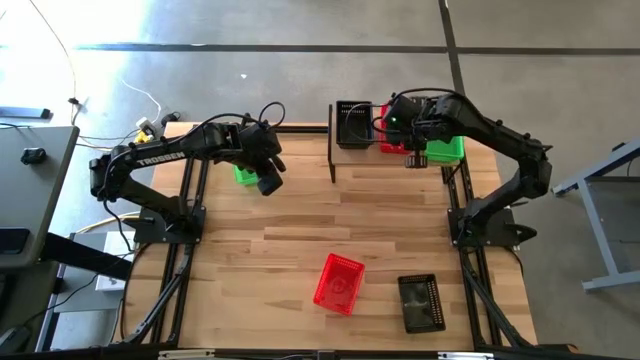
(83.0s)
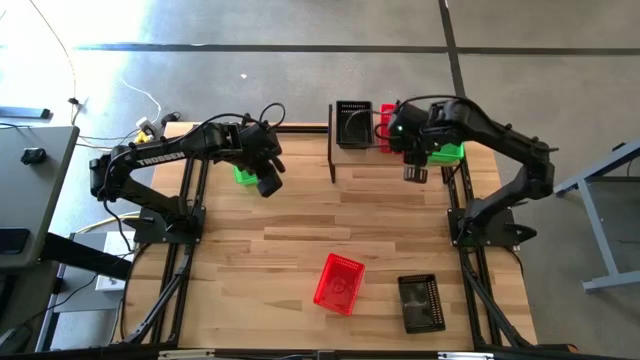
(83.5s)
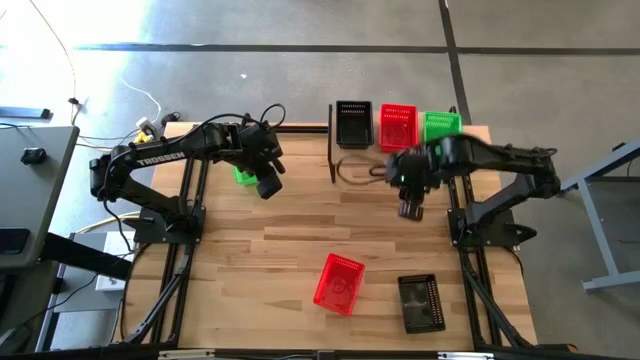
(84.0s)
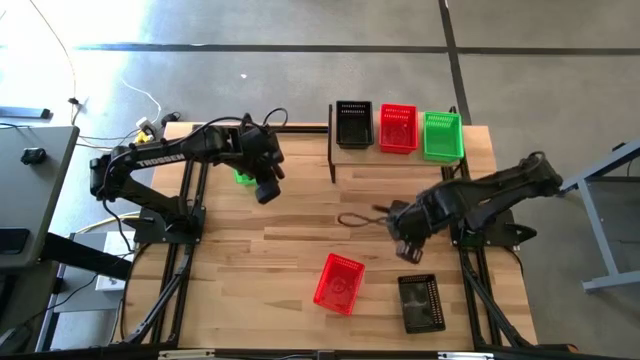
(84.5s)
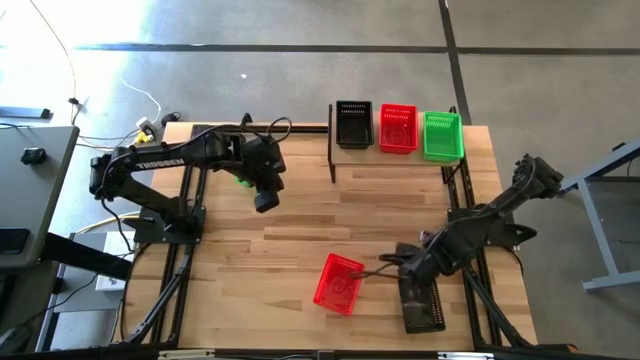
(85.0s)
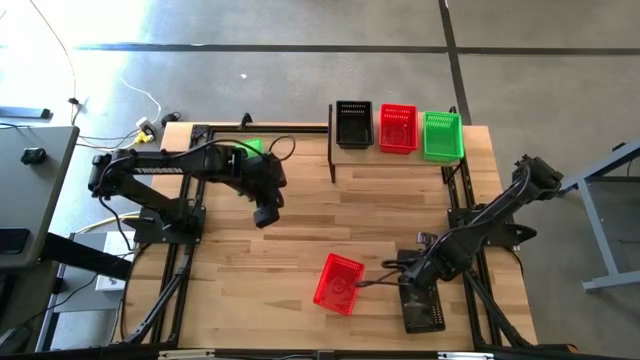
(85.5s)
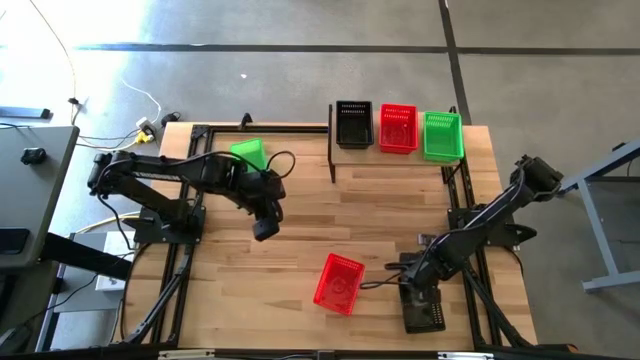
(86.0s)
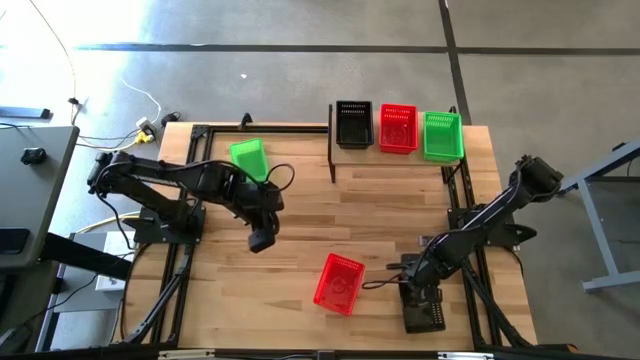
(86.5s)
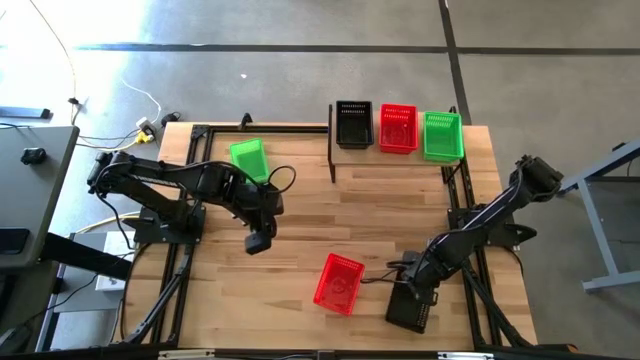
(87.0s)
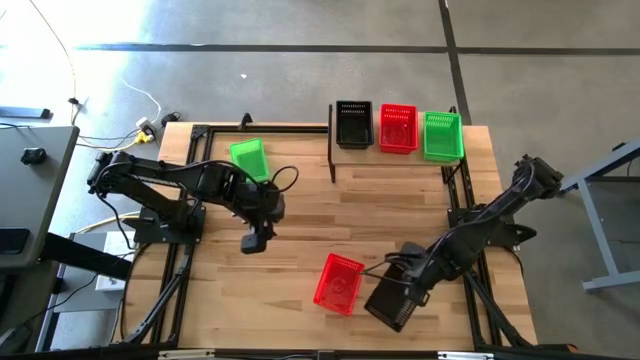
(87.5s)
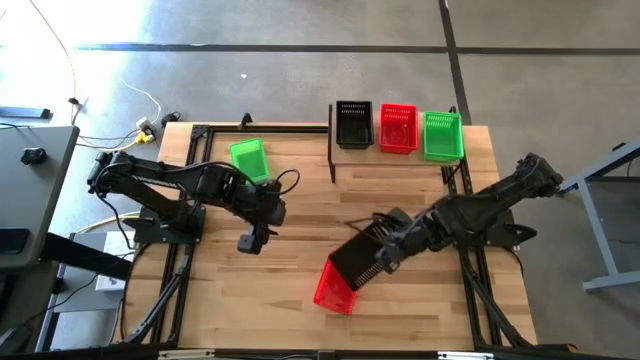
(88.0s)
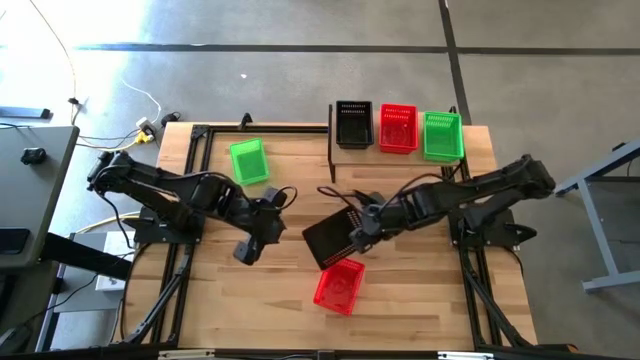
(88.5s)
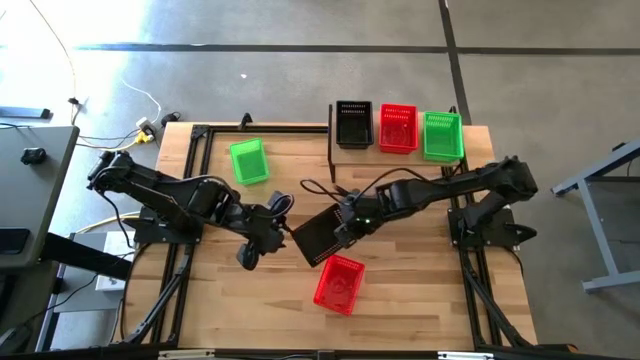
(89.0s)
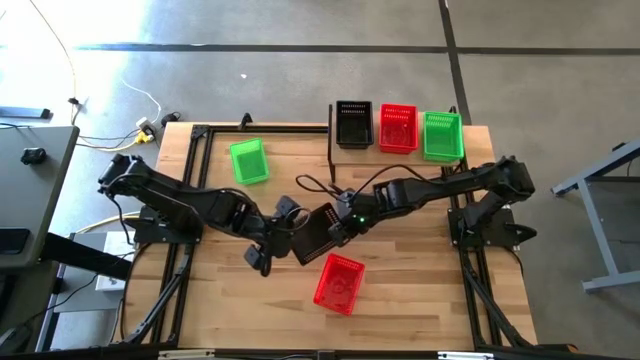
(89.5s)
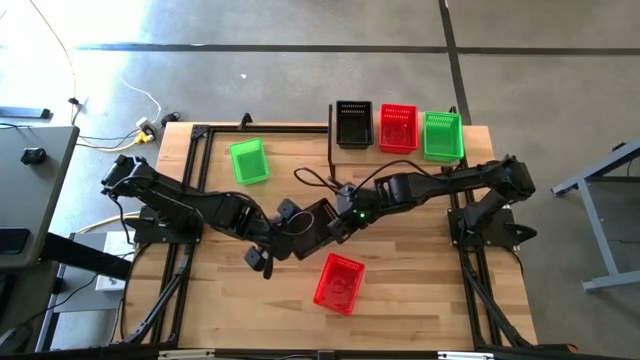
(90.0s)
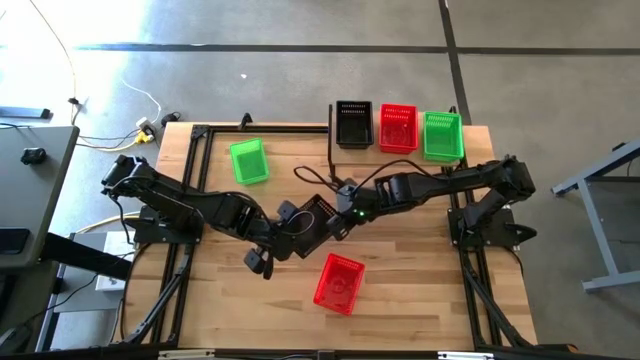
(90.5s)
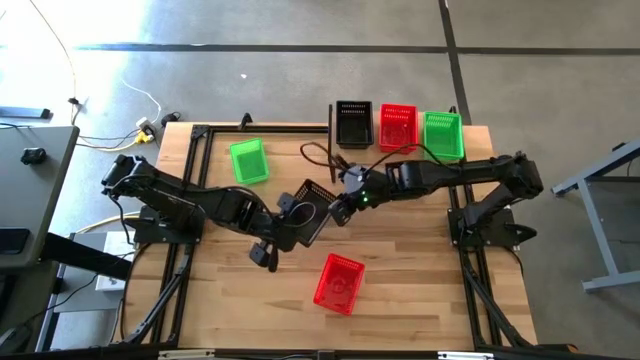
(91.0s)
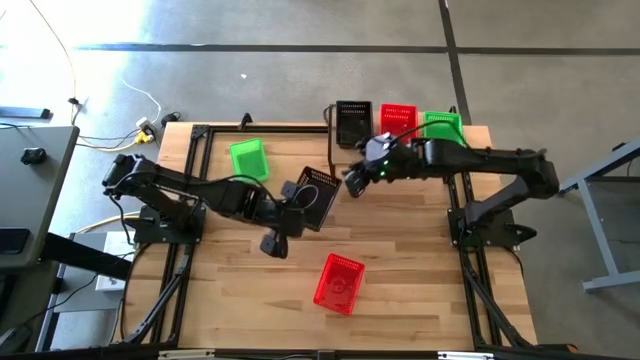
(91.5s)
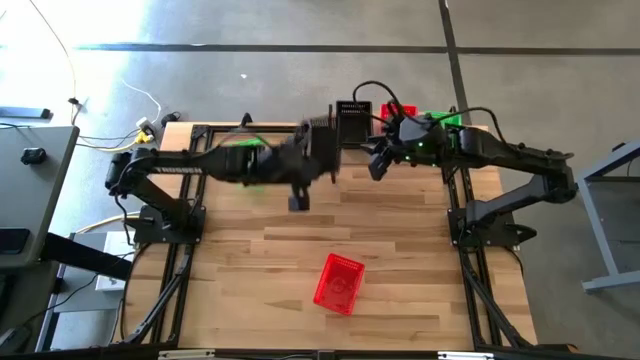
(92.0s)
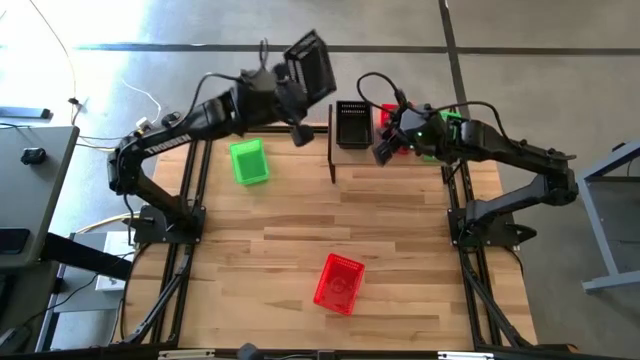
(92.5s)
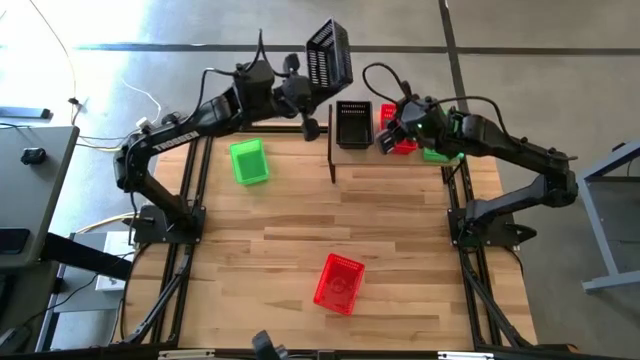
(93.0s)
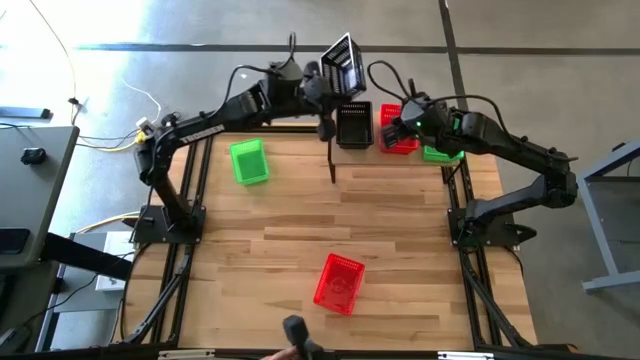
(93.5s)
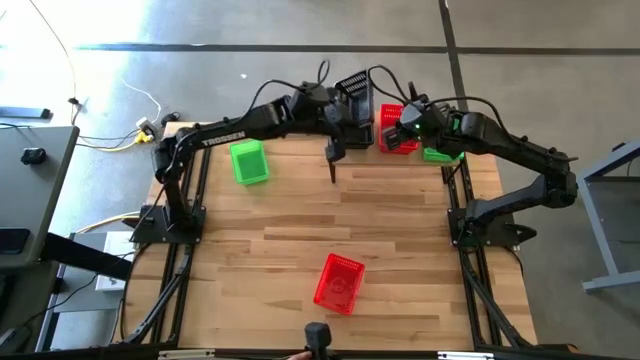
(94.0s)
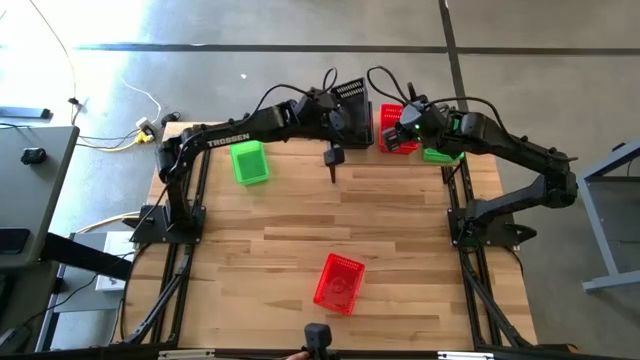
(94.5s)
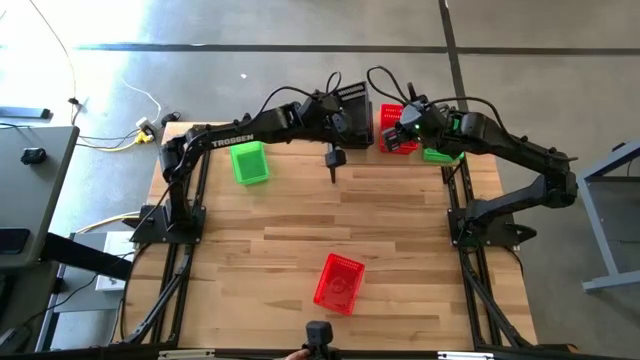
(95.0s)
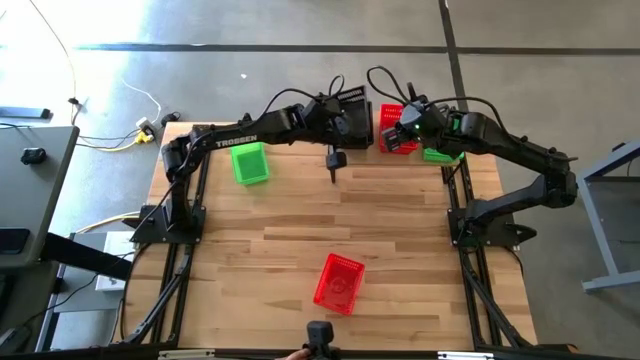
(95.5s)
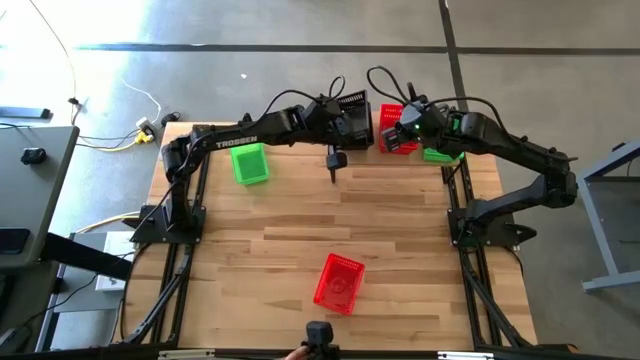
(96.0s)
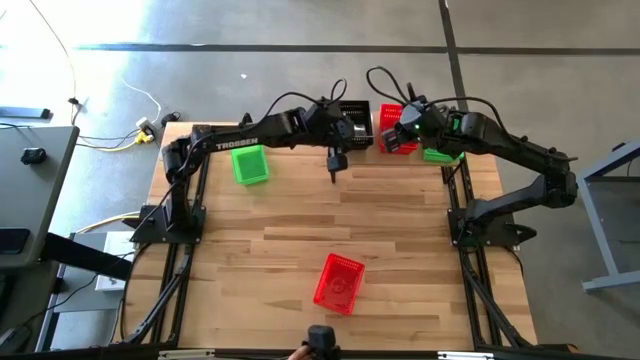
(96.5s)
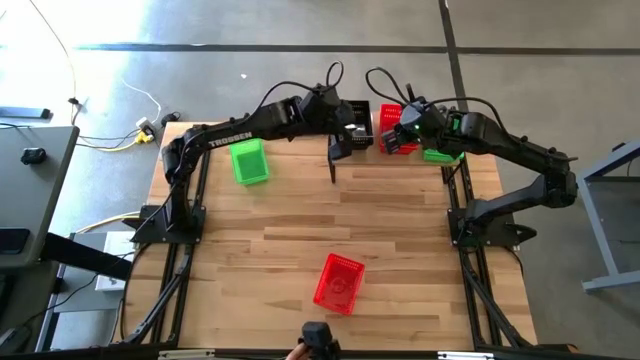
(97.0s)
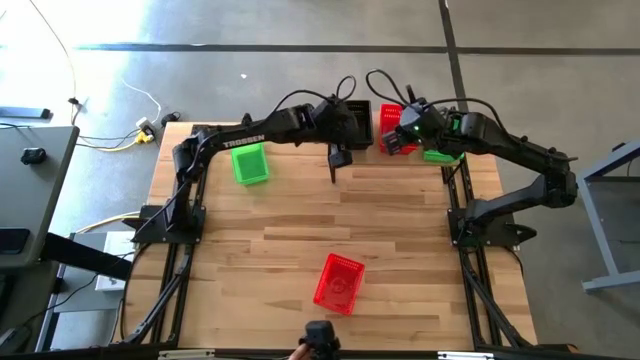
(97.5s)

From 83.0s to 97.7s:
Task: Stack baskets on shelf by color
Stack the black bin on top of the black bin on the shelf

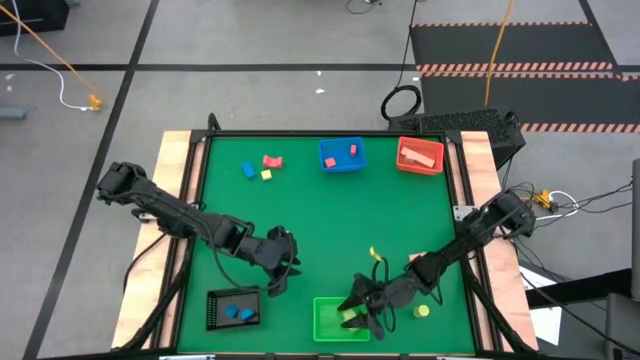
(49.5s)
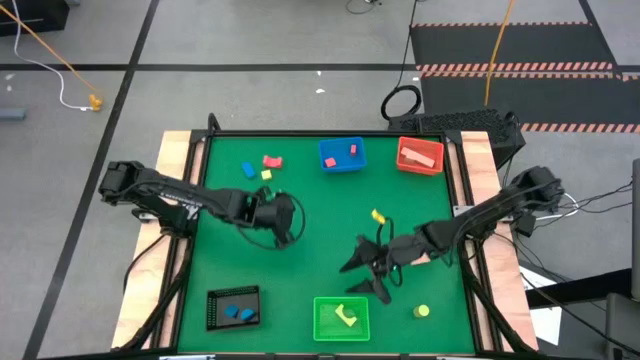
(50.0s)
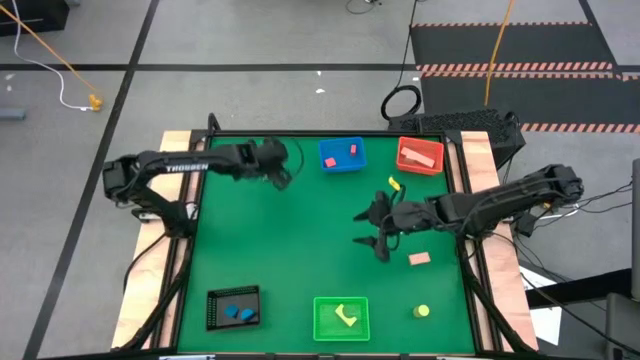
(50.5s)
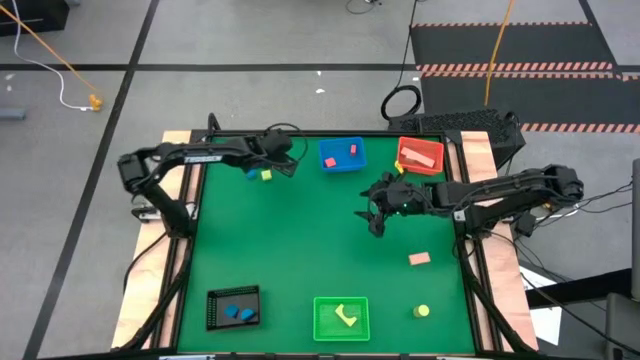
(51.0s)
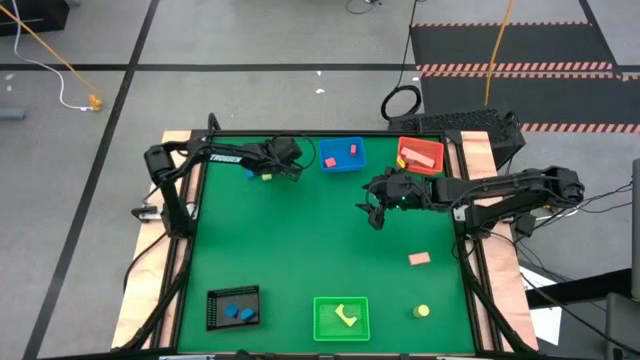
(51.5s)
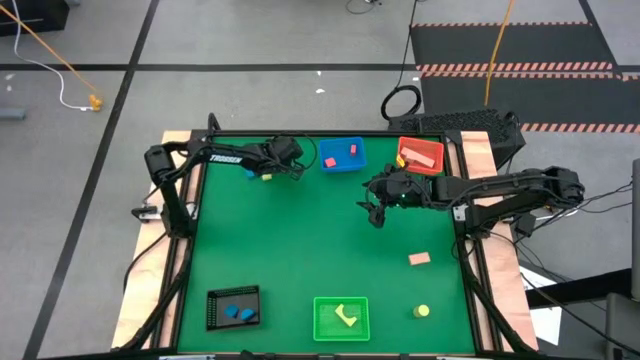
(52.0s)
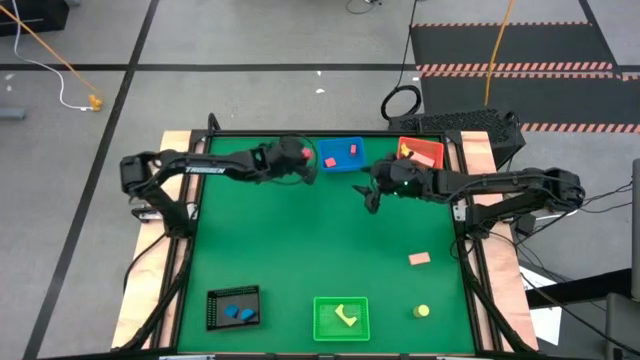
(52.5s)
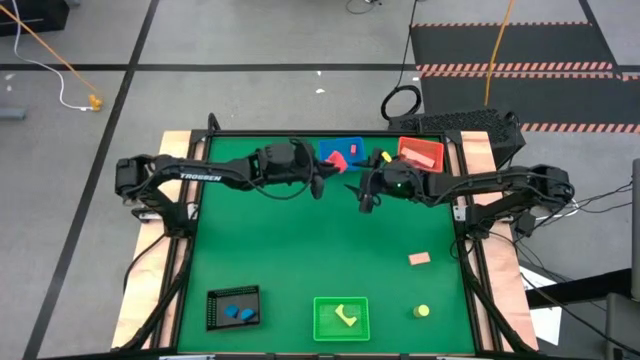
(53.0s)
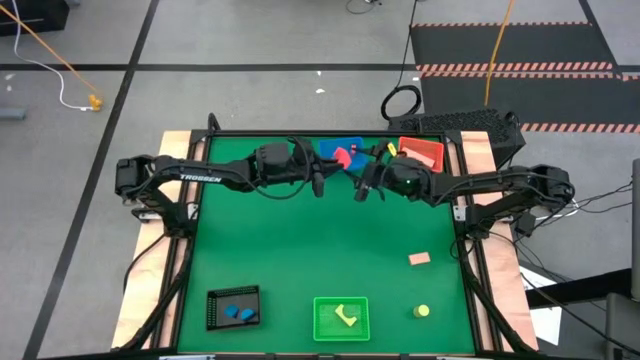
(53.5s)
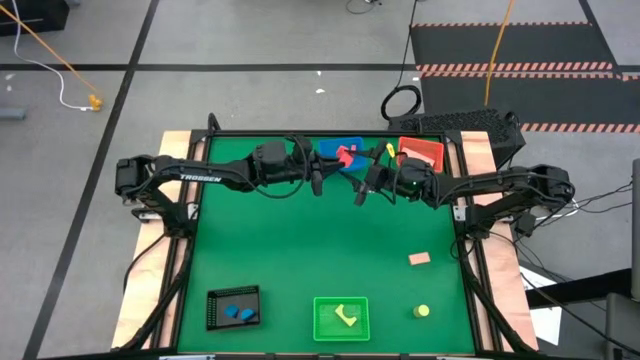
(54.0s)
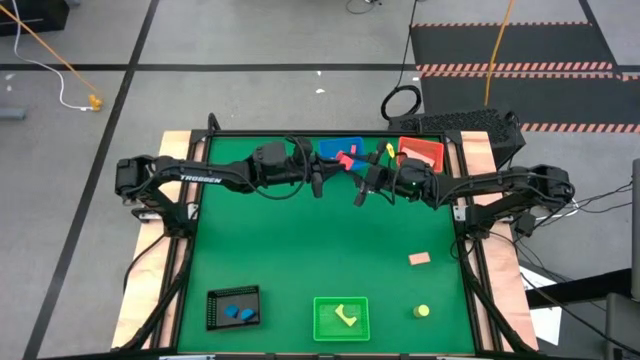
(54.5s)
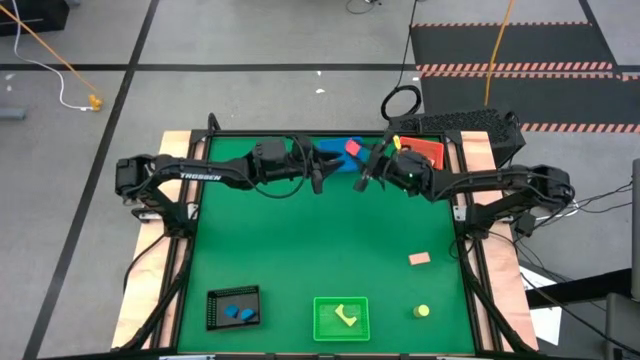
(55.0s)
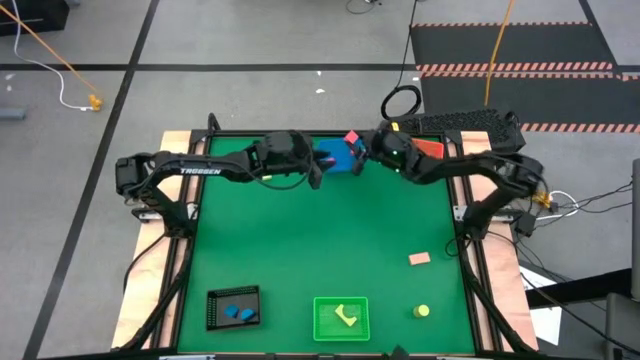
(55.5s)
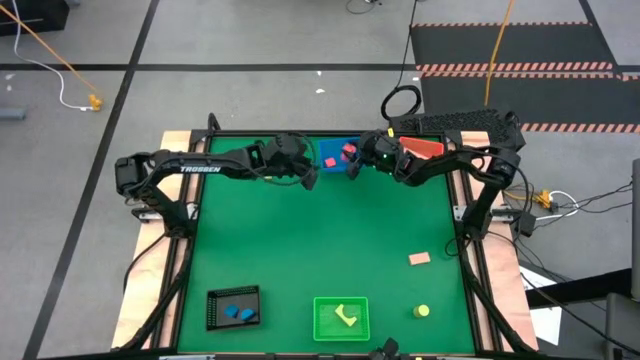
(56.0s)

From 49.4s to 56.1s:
Task: Sort & place blocks by color
Put the pink block into the blue bin

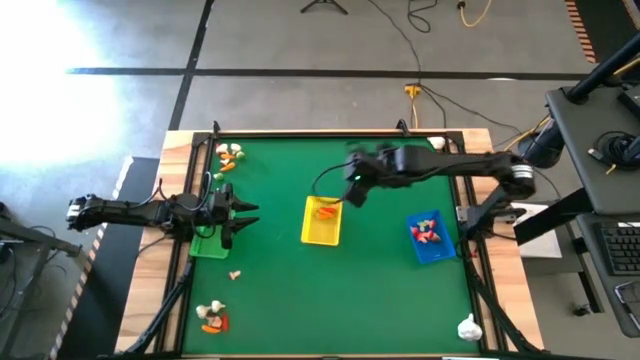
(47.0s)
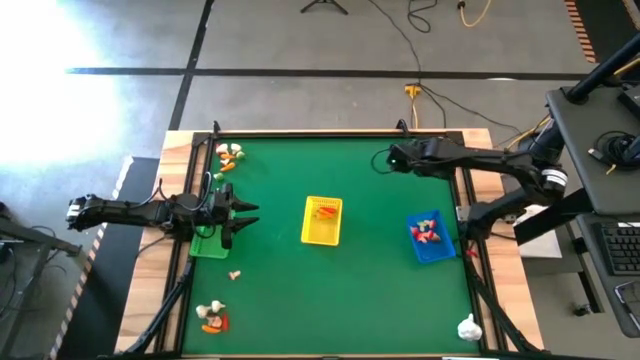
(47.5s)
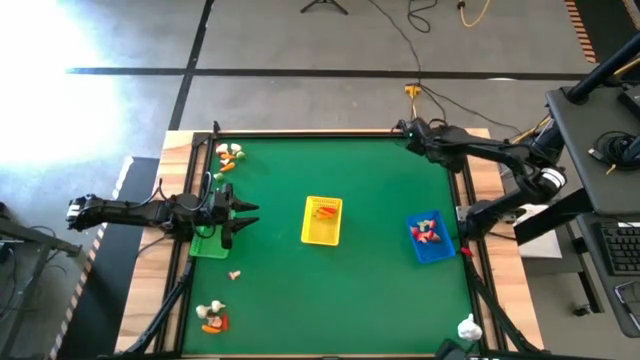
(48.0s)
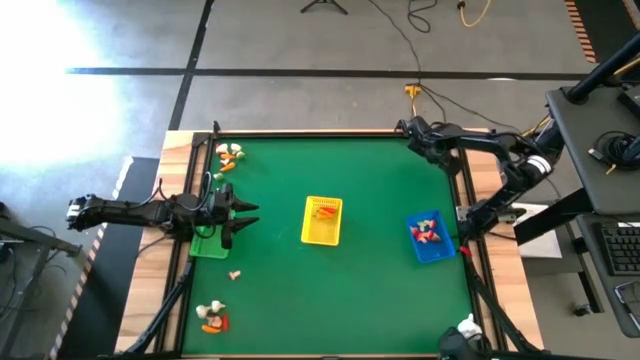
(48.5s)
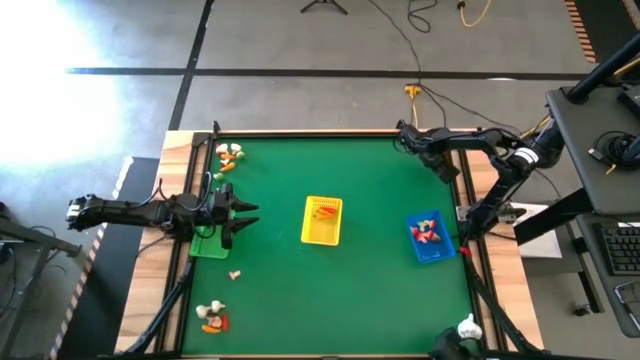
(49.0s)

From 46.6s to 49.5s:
Task: Sort produce into baskets
Put the red chili pepper into the yellow bin
